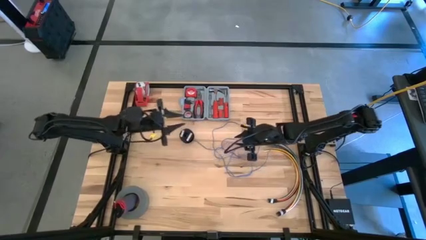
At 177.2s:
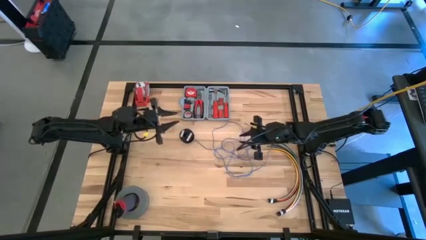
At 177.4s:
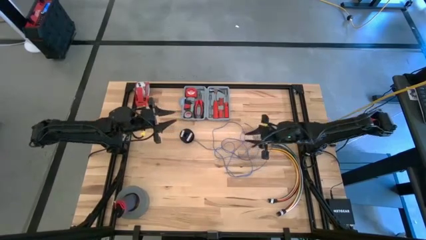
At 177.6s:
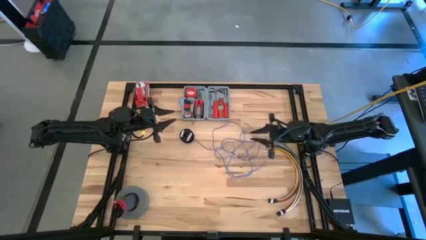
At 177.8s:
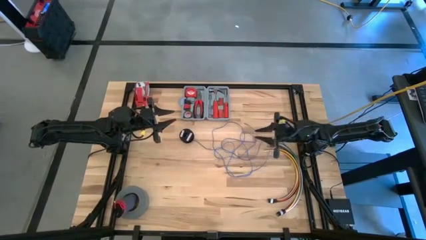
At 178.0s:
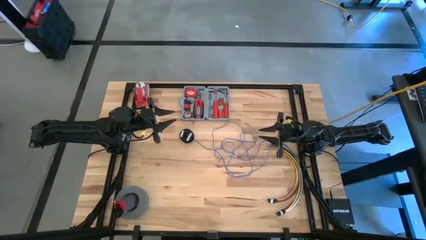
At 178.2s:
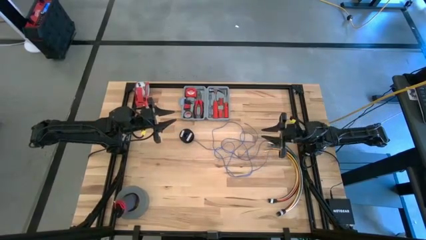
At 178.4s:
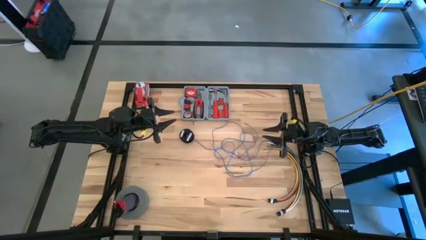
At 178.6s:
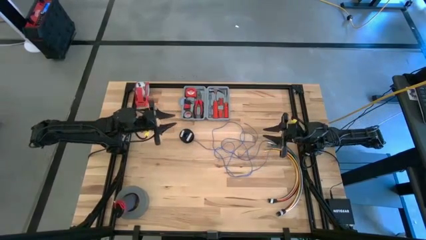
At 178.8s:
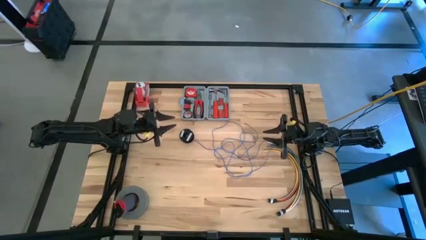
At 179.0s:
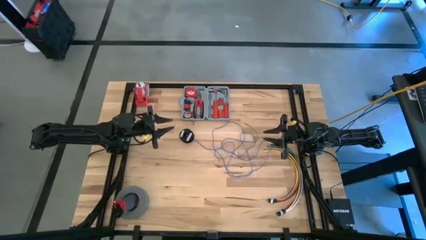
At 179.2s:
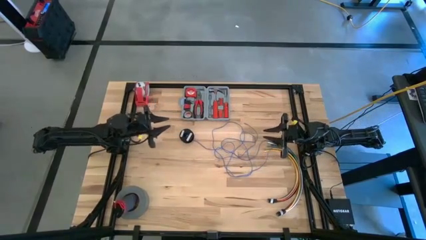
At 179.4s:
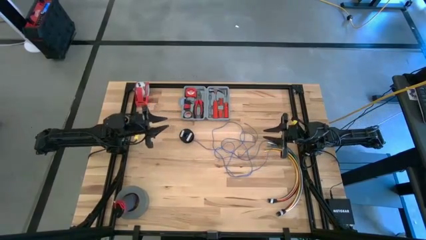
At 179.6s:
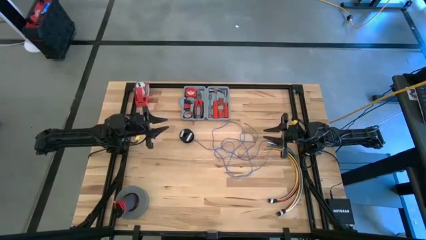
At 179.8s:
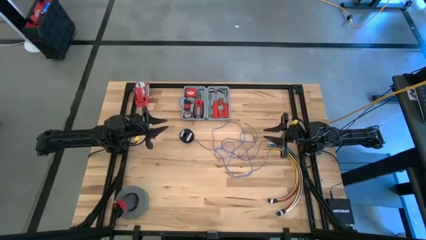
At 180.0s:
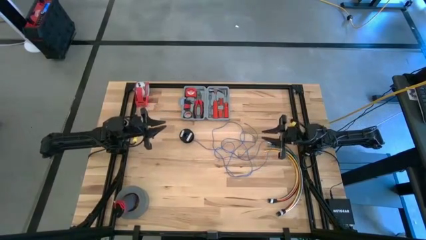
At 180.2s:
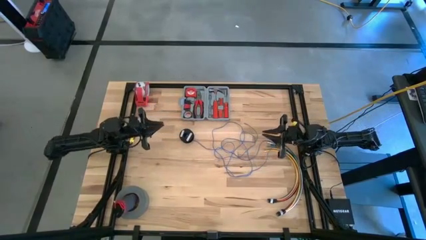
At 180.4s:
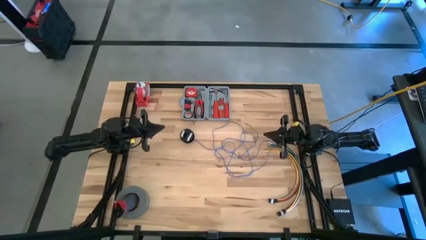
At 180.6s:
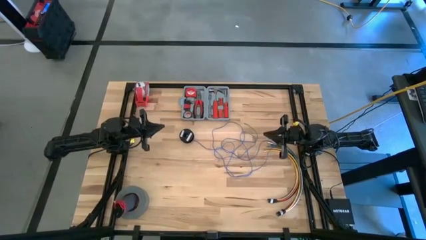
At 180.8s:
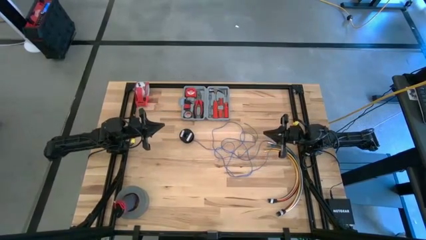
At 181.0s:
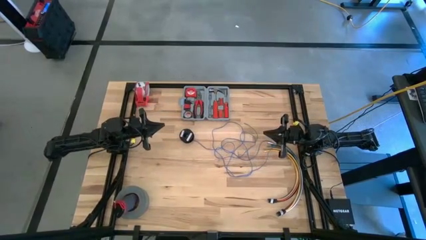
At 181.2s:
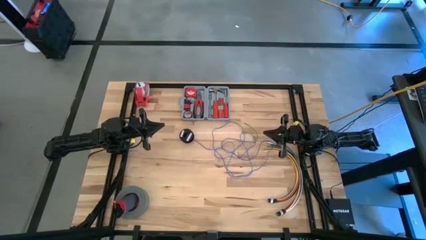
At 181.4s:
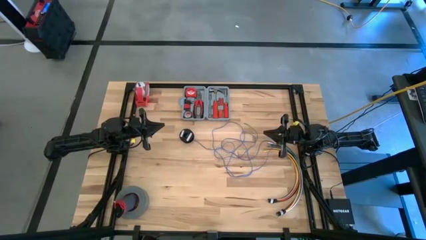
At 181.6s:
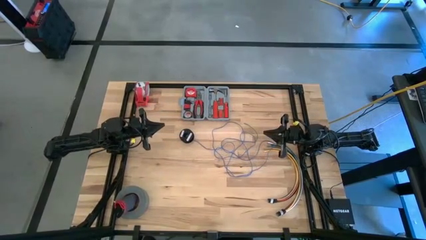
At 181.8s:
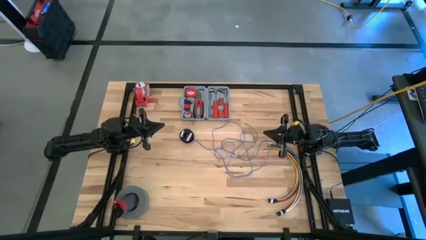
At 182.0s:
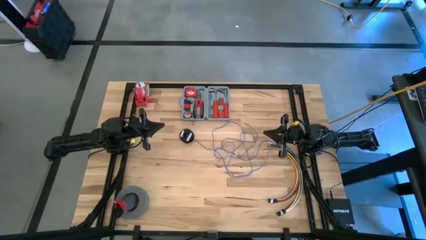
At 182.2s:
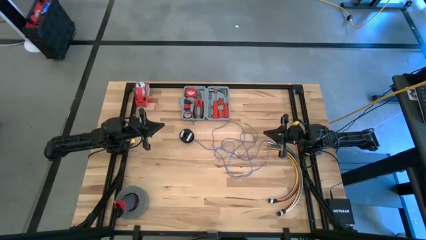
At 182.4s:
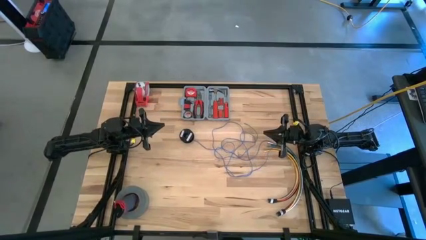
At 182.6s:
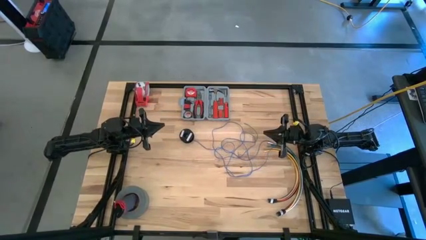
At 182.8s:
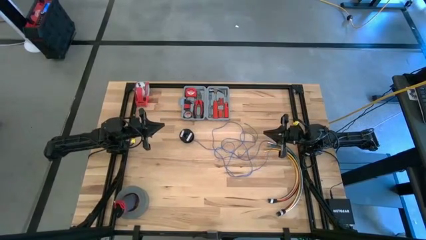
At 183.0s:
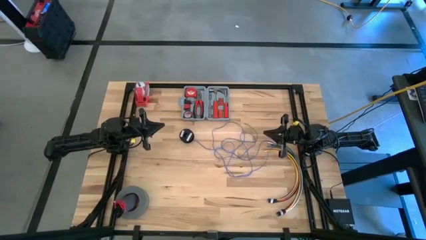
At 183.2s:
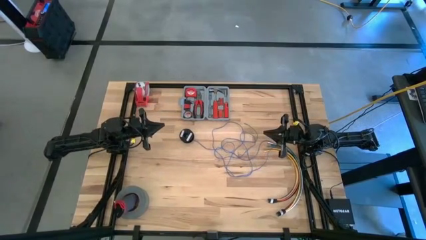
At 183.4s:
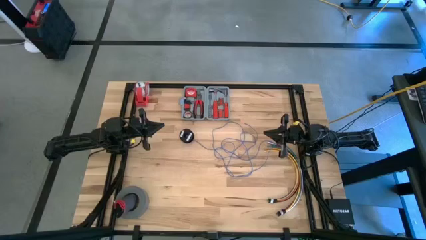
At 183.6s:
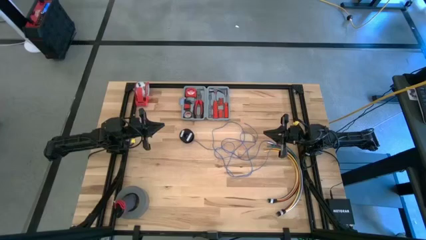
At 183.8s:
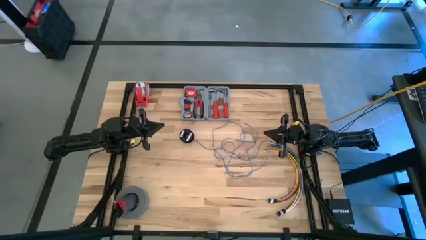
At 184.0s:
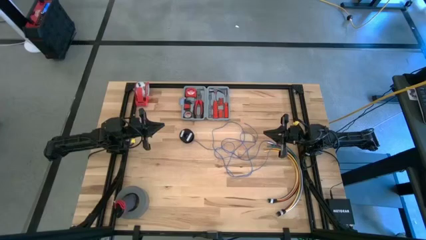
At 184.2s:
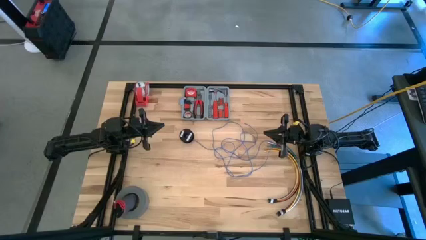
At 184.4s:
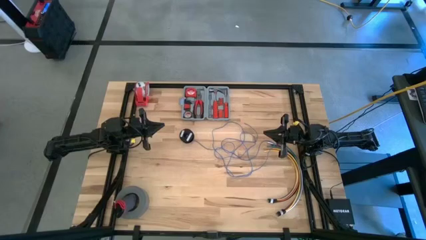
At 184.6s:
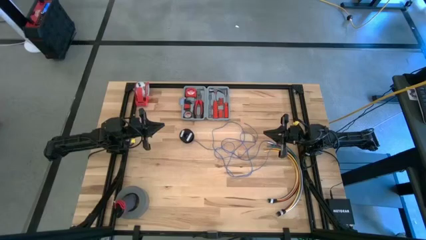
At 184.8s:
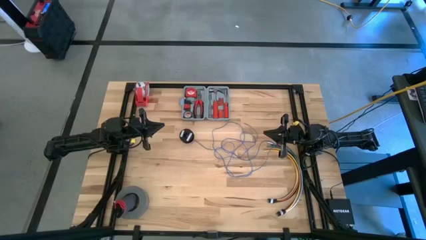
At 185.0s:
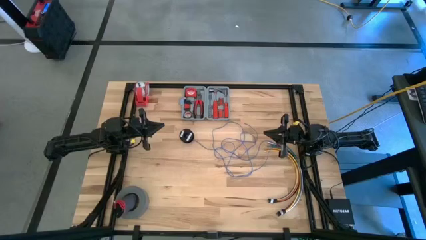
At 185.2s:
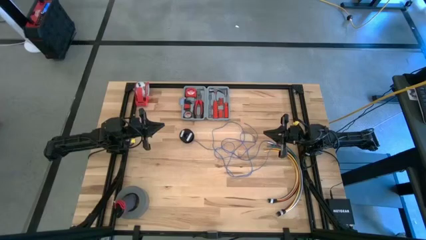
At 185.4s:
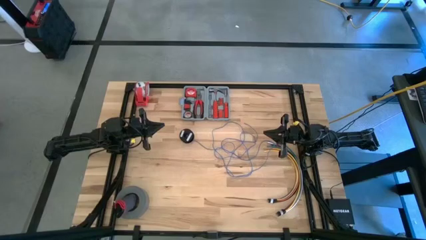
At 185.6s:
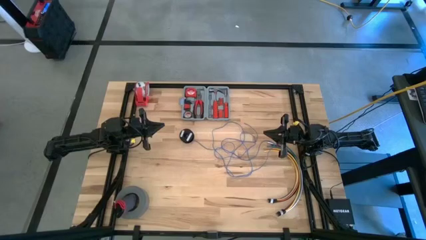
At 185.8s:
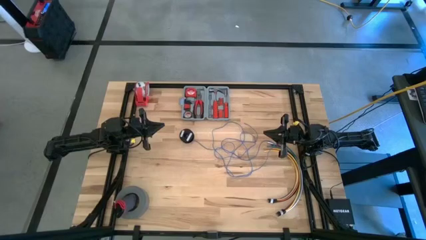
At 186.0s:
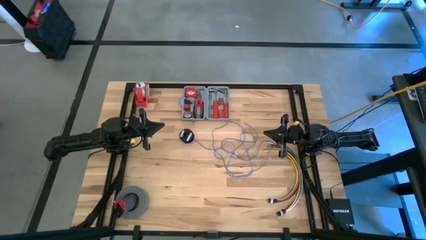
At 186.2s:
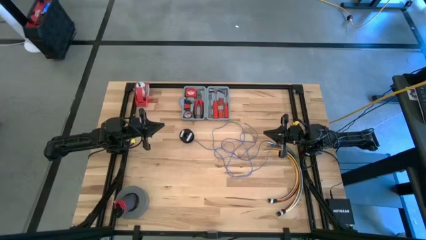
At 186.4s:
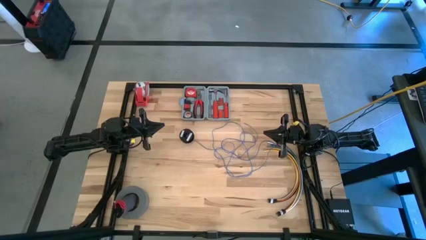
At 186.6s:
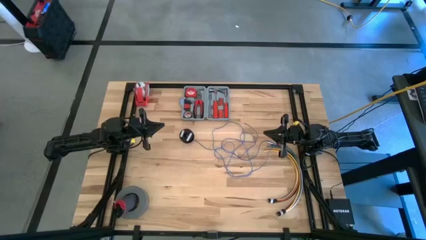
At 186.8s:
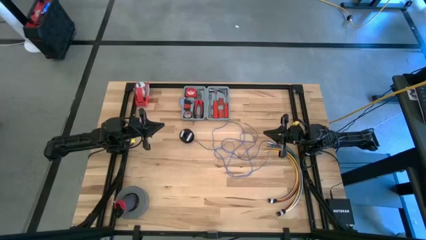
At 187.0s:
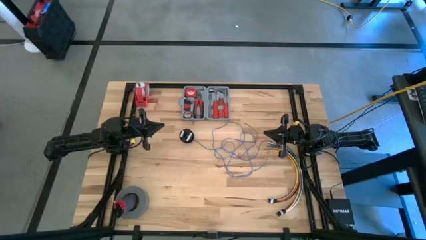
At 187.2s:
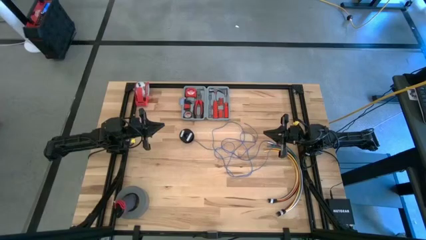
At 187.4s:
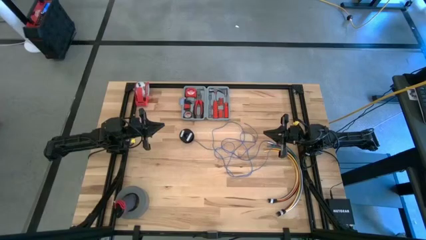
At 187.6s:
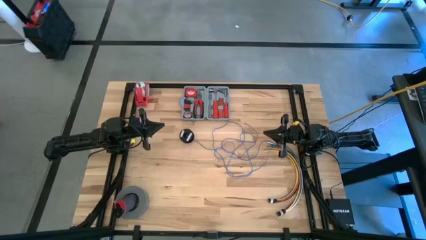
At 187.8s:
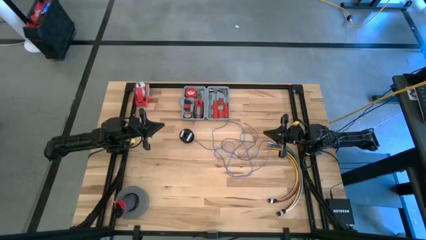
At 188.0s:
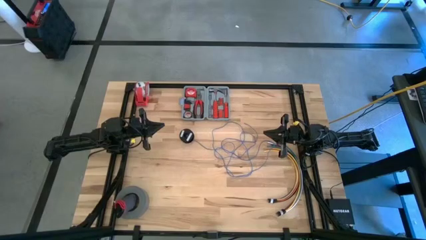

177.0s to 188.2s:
Task: Coil cords
Return to Home Position

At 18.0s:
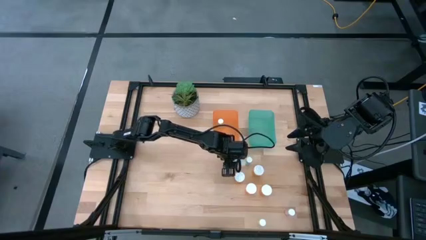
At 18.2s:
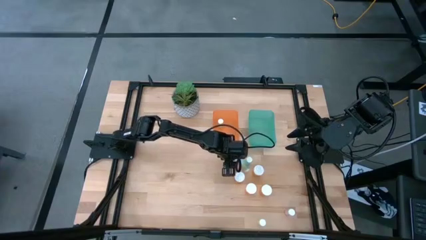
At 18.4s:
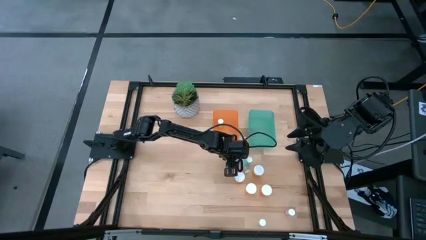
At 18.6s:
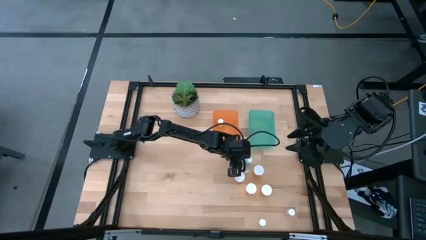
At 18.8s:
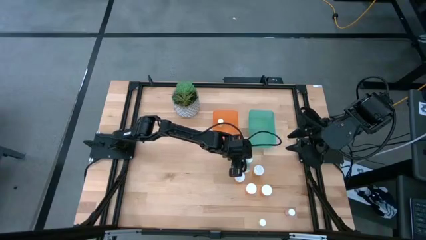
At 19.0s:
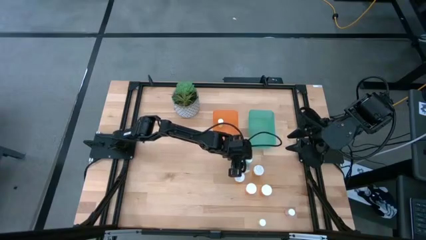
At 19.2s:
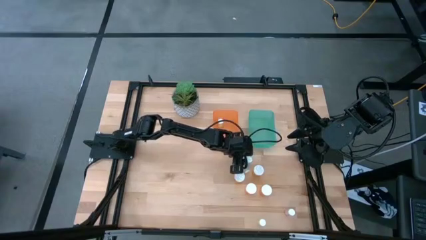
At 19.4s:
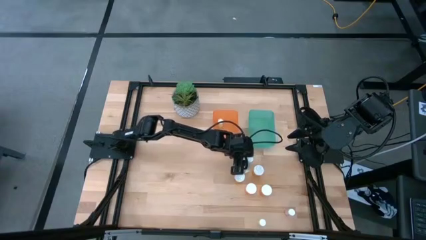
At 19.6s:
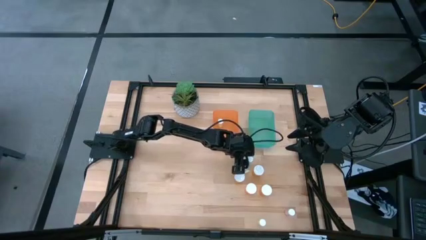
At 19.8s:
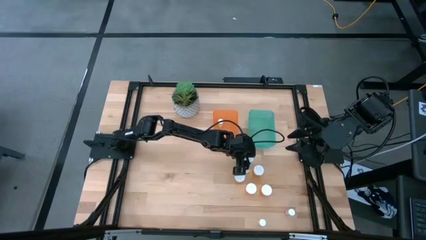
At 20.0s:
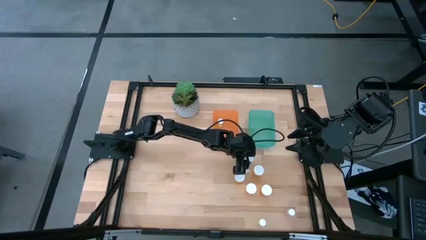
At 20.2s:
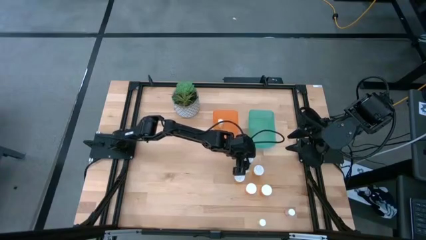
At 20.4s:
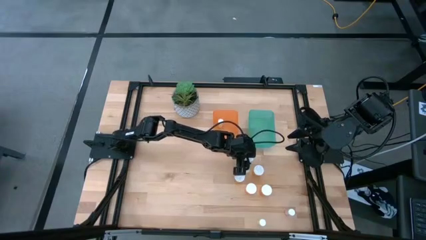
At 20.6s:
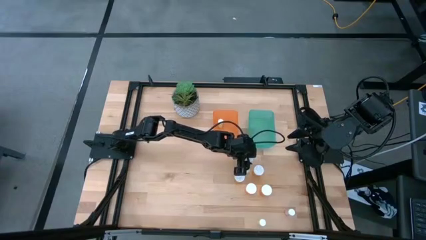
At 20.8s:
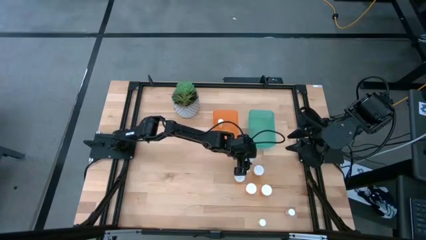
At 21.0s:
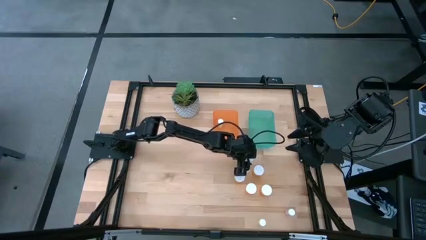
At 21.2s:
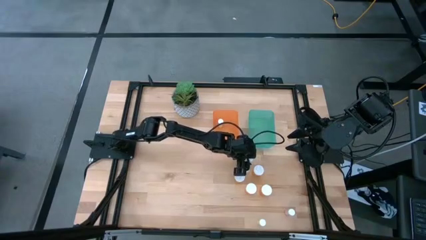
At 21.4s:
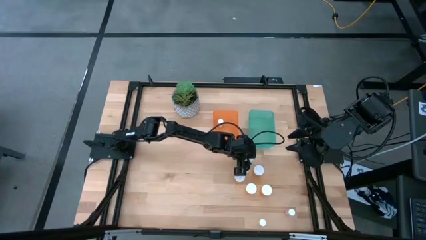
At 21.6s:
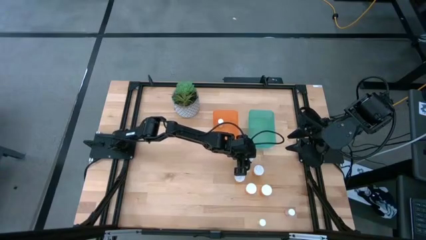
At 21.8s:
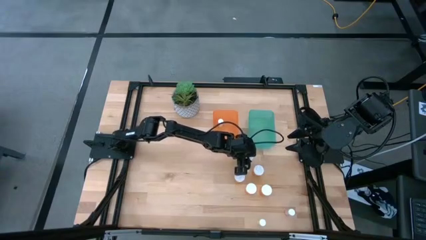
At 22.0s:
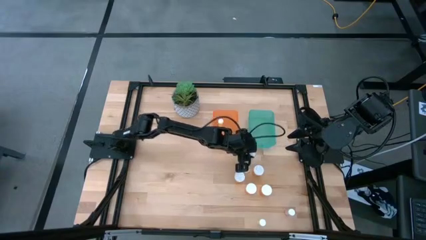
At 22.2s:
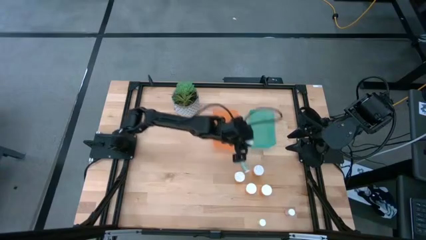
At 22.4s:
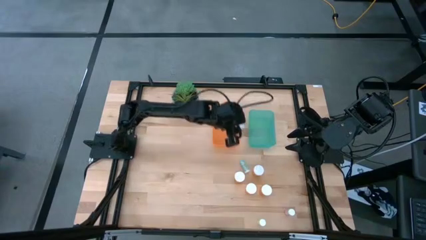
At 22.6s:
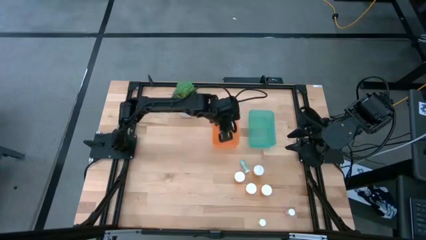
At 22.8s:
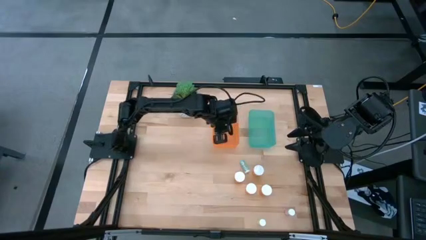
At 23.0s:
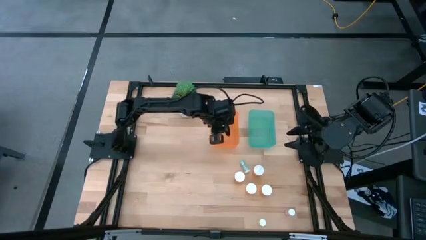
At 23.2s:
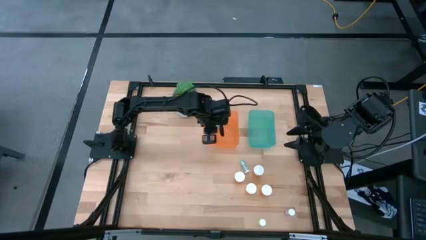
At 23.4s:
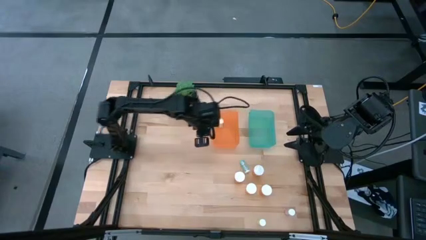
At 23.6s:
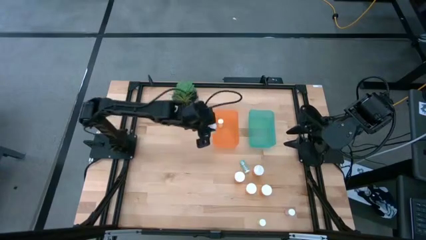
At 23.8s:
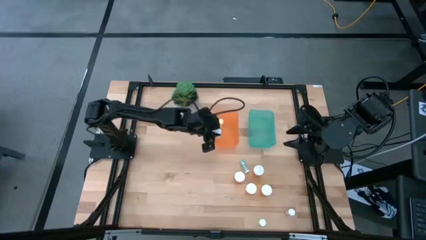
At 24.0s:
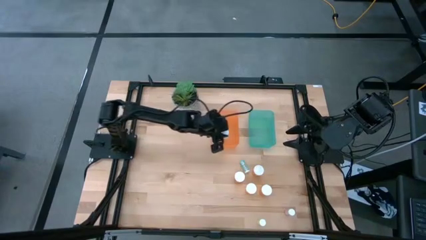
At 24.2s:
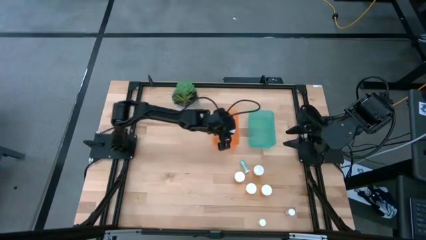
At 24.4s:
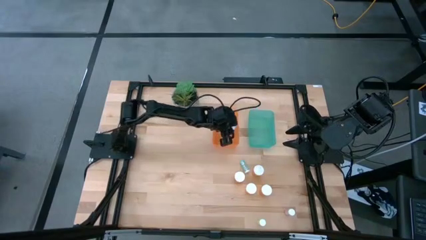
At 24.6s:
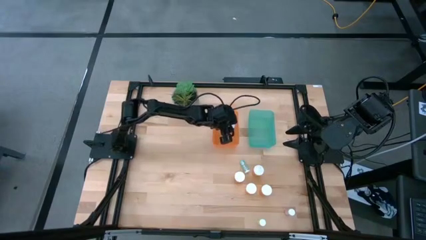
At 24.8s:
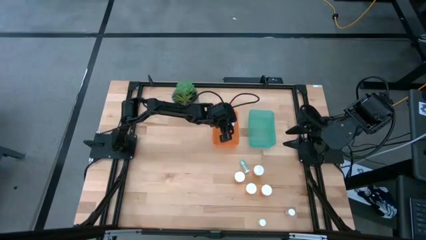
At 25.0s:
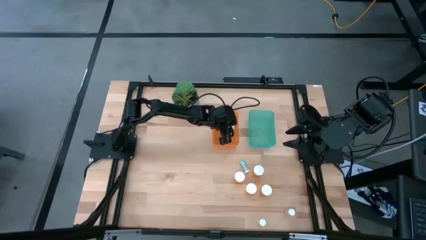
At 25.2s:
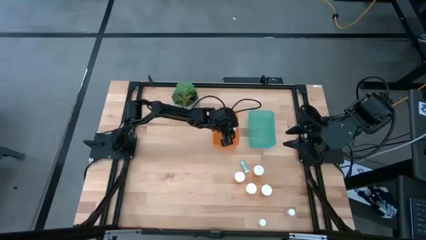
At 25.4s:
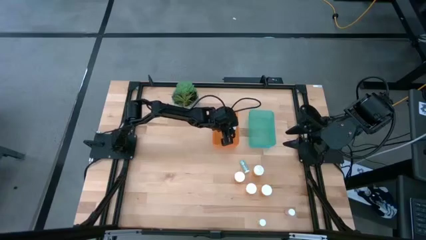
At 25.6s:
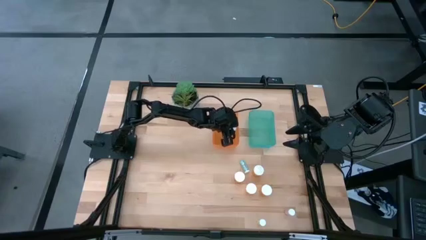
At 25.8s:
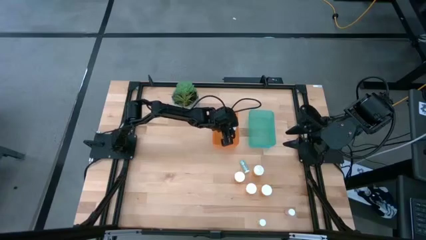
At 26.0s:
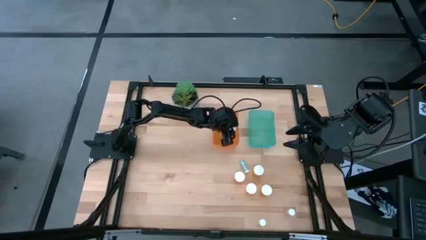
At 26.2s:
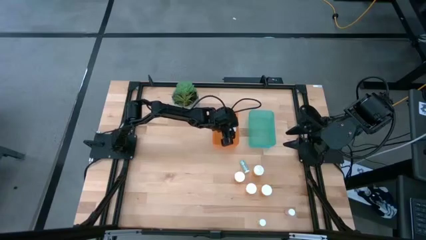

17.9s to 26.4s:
Task: Pick and place medicine bottles into bin by pill shape (circle, oval)
Put the right small blue bottle into the orange bin
